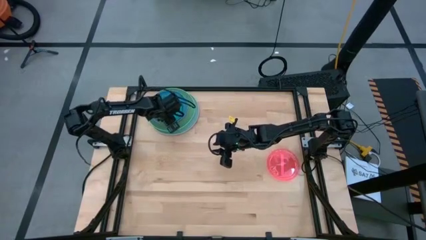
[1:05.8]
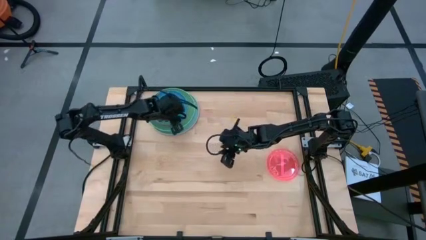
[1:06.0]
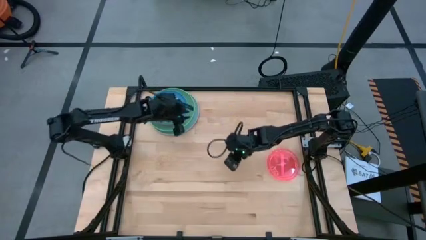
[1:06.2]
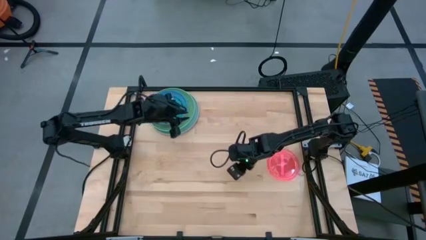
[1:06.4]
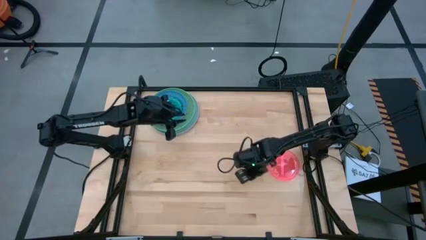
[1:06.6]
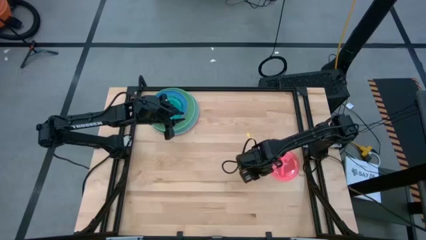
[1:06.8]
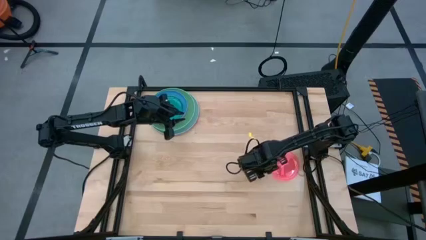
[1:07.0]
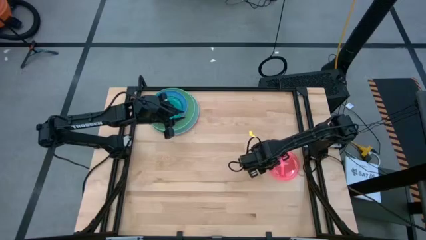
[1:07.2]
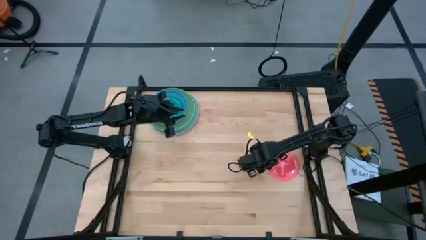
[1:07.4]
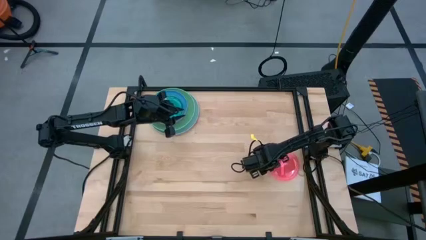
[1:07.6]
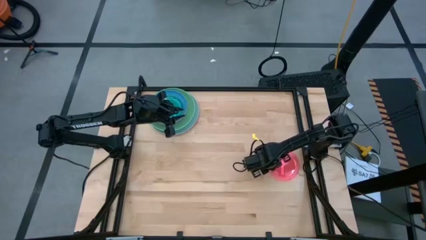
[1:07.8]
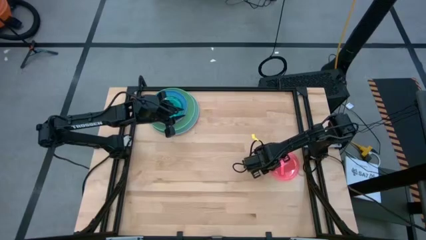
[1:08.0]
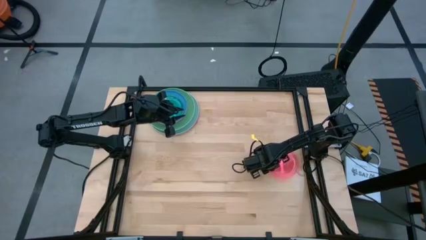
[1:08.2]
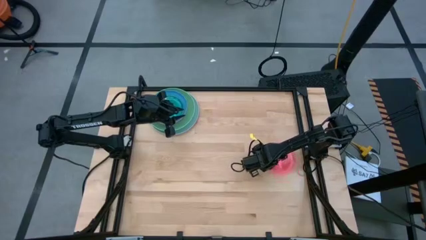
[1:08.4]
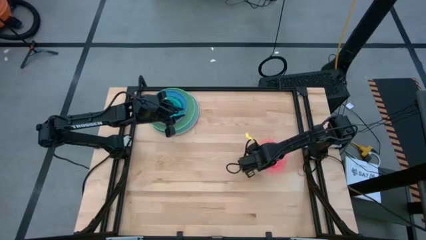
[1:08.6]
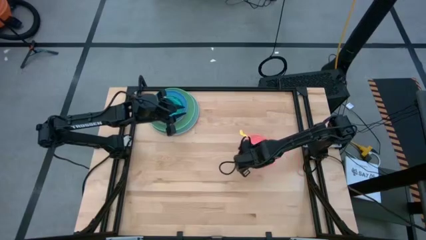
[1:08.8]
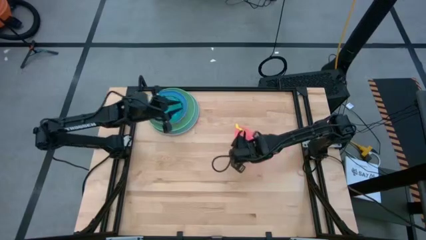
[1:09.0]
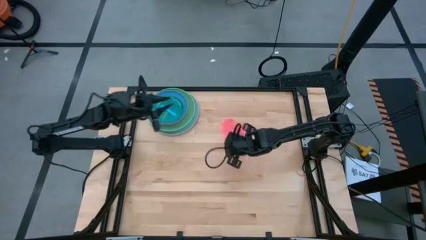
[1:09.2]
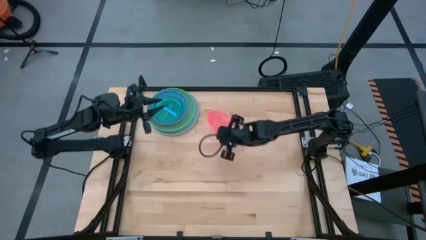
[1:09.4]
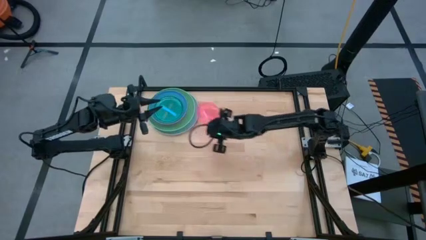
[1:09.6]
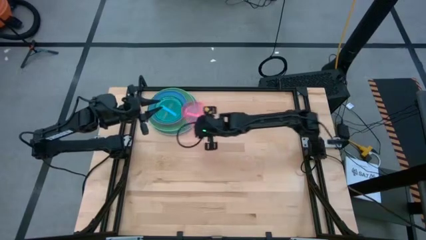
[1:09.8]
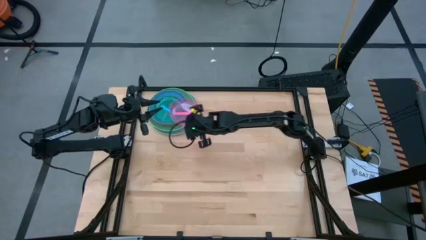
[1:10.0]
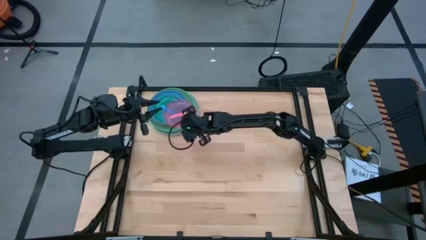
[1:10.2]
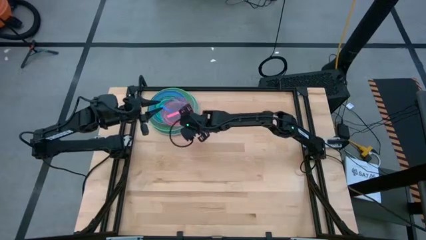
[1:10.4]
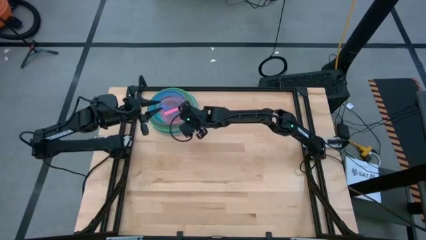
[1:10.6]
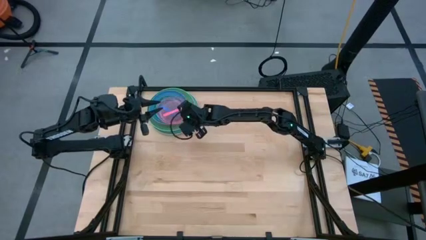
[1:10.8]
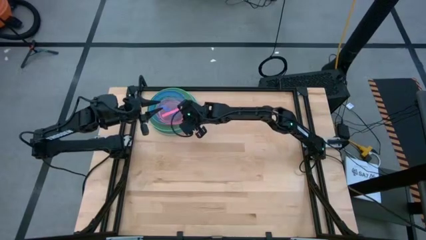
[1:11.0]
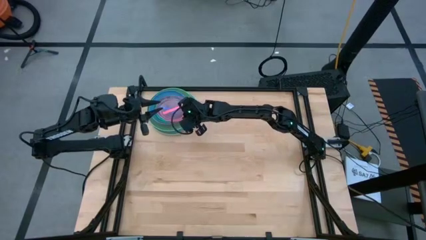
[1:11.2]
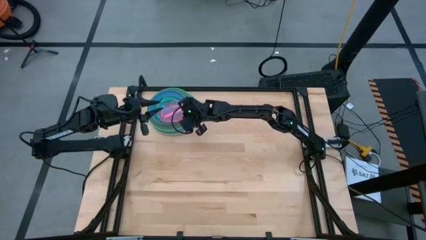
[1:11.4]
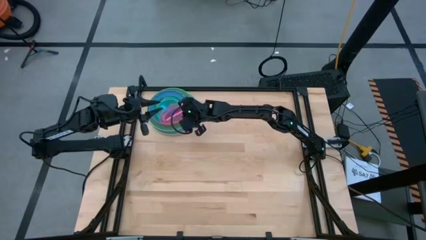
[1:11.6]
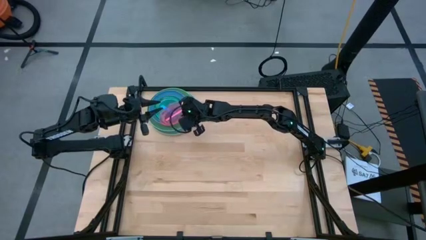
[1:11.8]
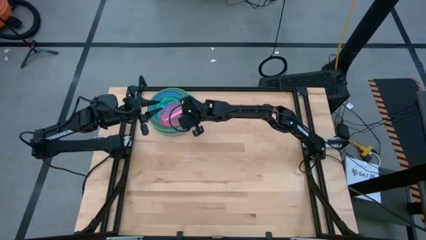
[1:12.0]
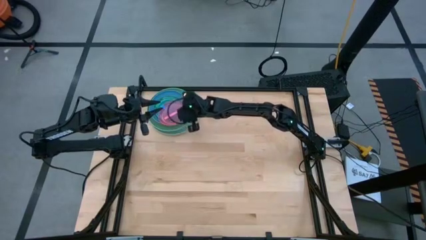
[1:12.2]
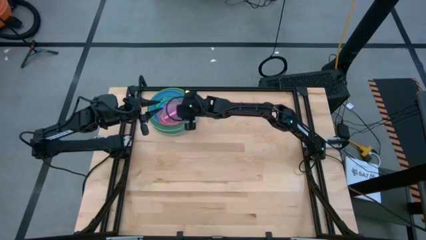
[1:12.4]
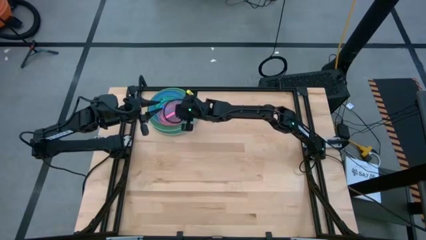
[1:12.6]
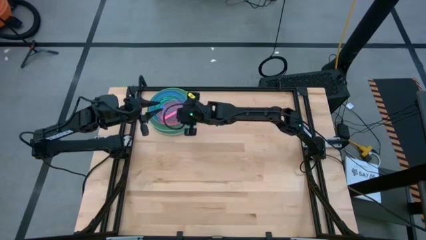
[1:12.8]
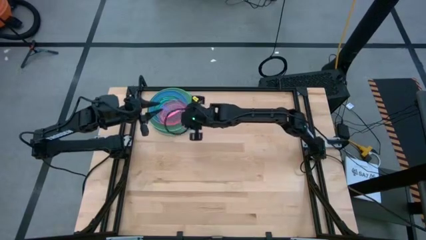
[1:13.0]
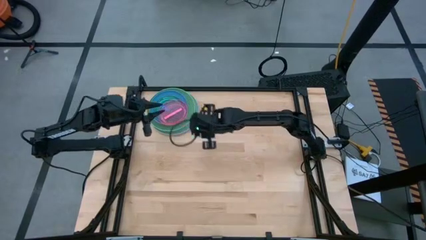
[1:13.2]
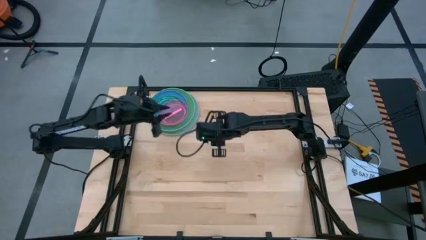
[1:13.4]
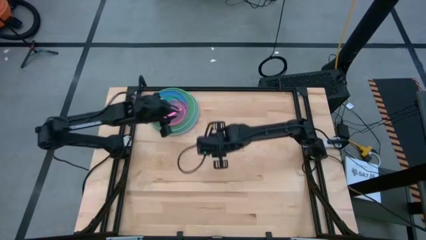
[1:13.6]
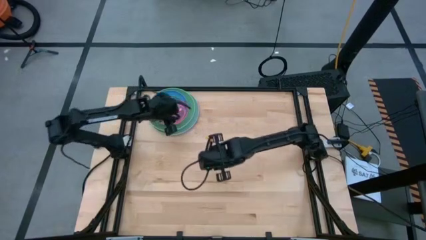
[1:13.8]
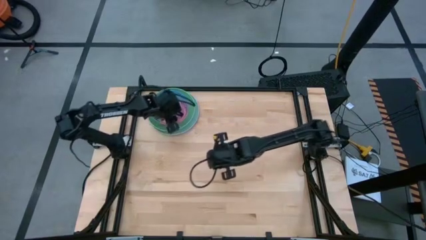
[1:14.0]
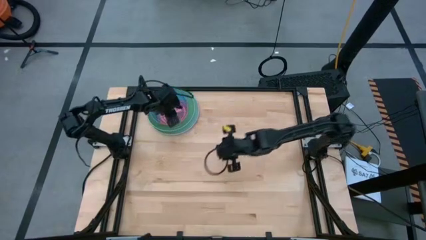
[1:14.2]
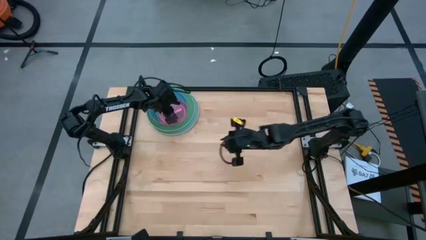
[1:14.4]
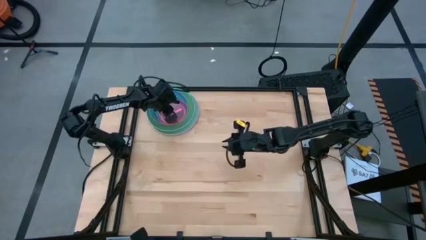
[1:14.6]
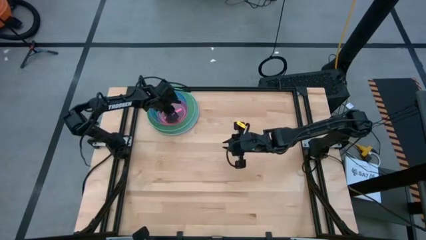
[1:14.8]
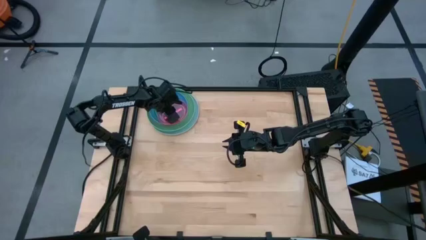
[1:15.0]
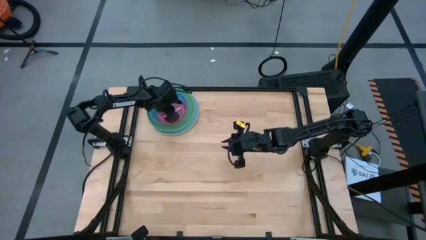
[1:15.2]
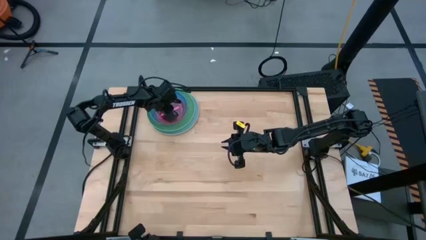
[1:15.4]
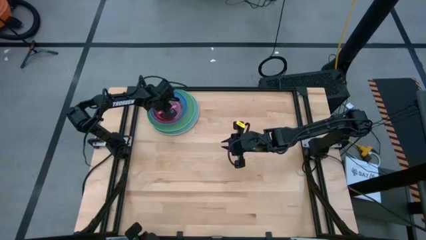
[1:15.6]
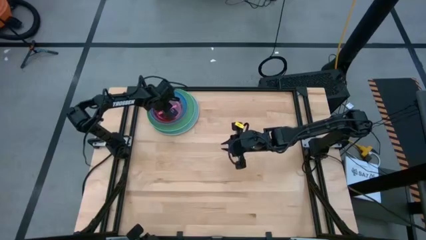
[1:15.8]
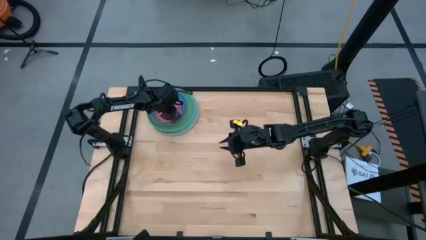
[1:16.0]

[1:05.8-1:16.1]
Task: Stack plastic plates
Stack the pink plate on top of the blue plate

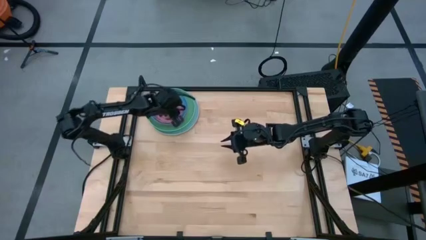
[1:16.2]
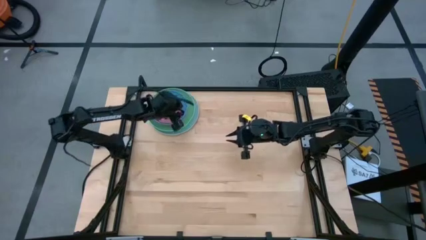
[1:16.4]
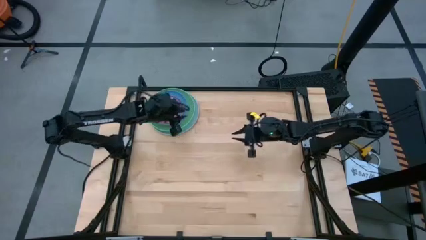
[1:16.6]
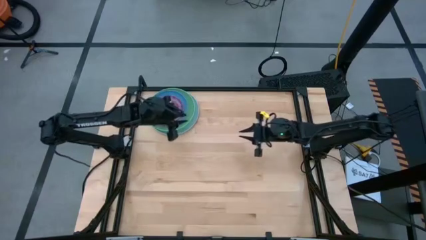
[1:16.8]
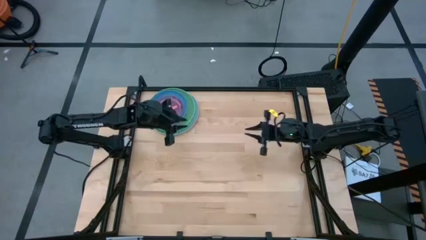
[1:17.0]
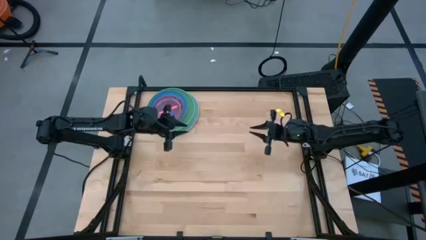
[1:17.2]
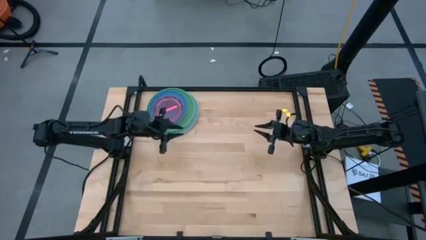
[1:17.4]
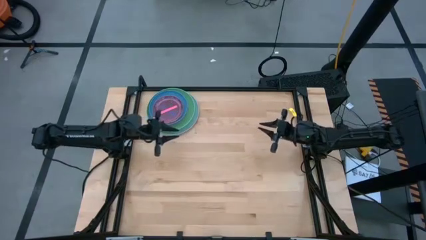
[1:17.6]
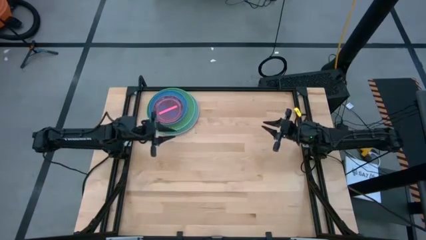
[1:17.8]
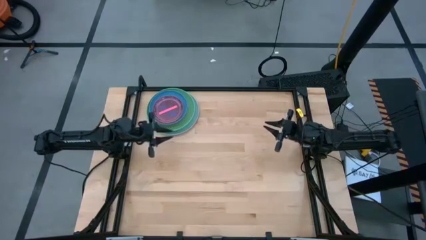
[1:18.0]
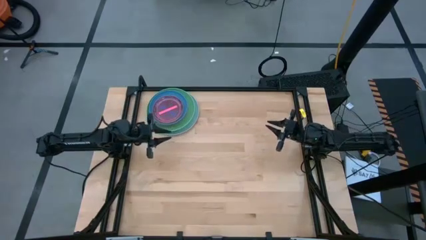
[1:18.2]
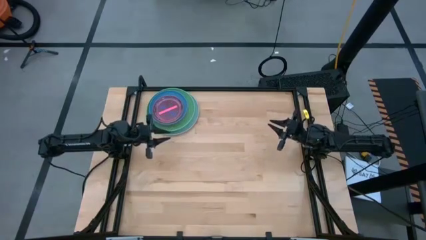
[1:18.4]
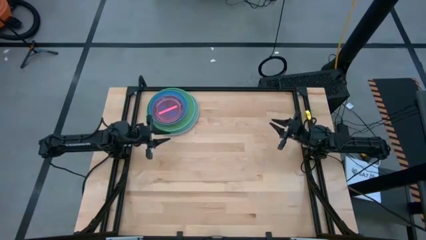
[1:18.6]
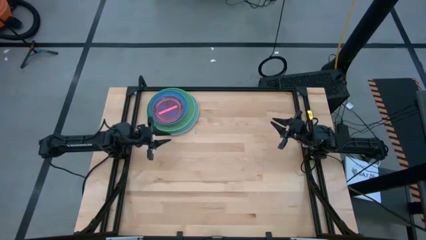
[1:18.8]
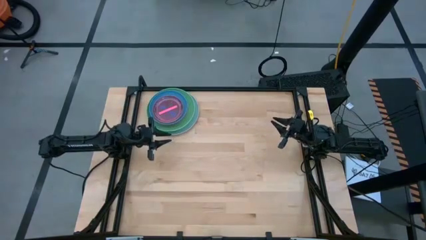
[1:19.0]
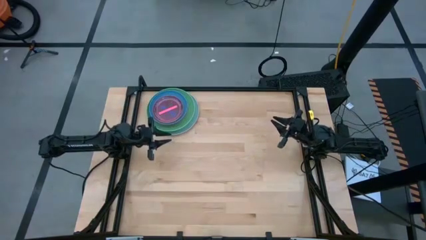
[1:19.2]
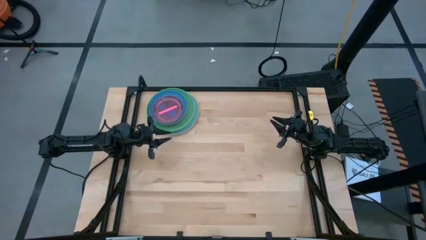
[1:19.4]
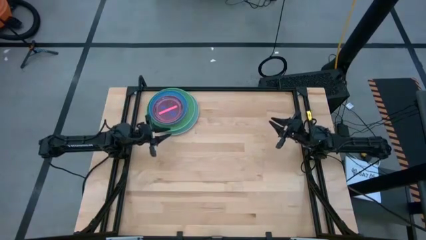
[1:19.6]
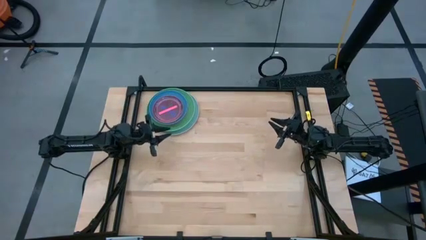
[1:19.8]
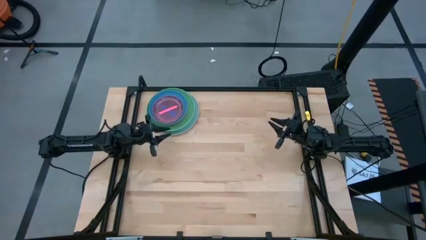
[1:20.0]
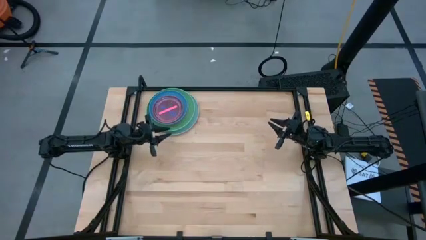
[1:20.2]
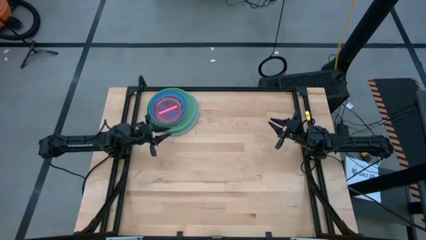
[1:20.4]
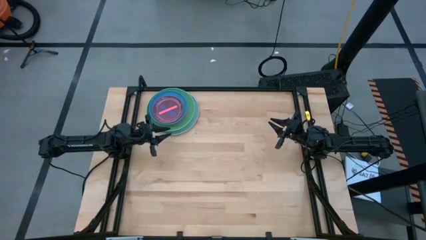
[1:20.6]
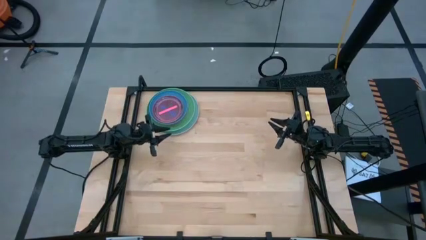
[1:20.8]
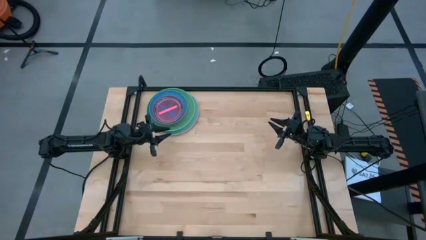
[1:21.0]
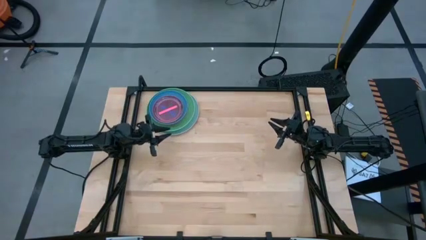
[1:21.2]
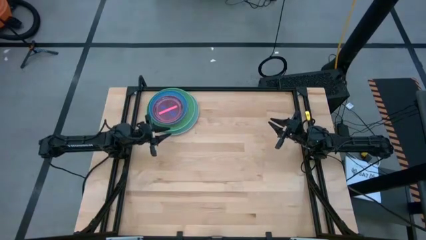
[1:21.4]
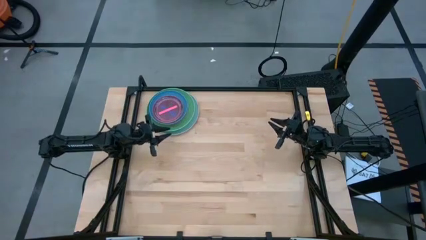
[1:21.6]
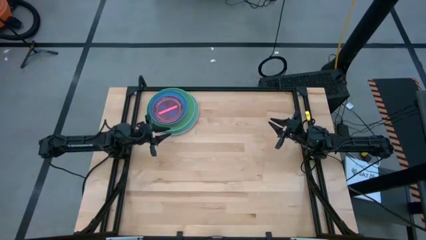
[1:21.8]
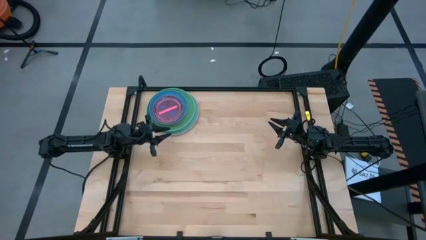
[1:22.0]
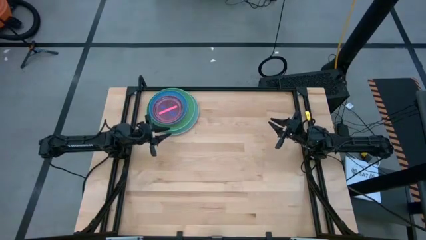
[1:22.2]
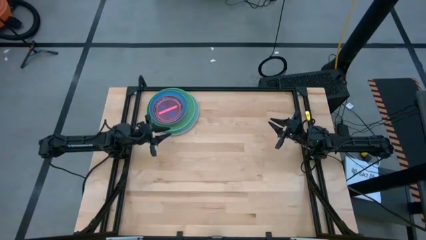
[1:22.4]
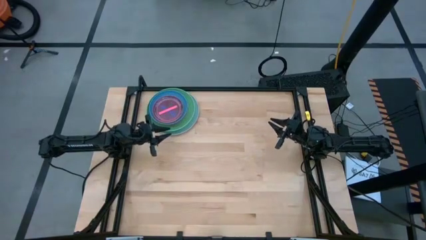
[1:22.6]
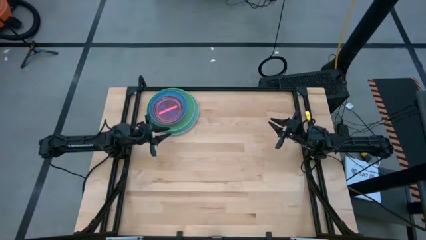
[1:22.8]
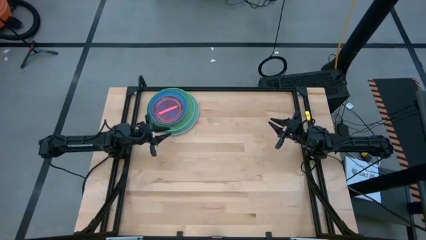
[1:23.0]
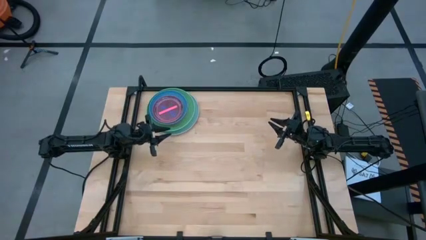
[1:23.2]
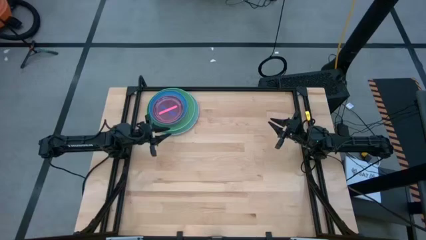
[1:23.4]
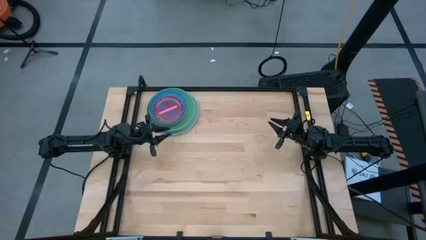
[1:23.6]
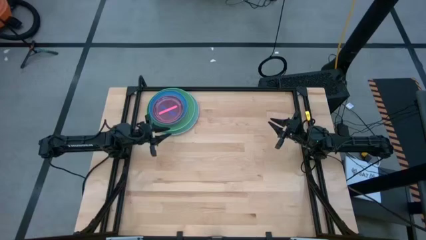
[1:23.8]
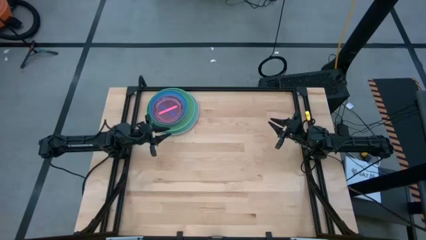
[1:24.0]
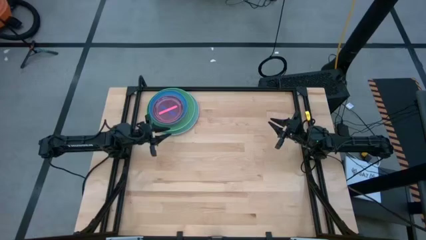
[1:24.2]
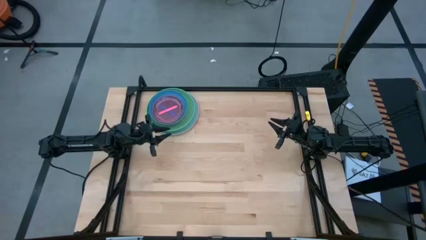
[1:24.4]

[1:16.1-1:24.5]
Return to Home Position
